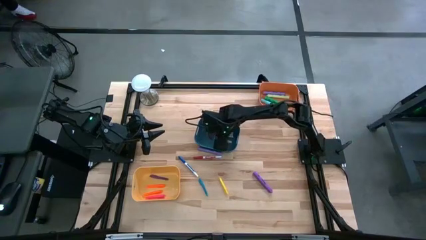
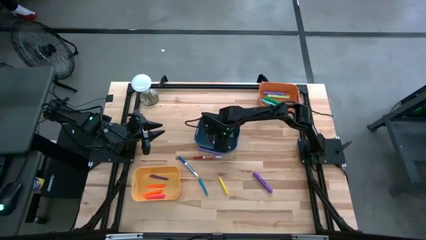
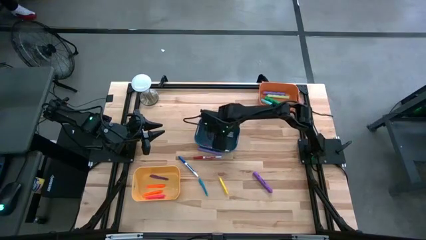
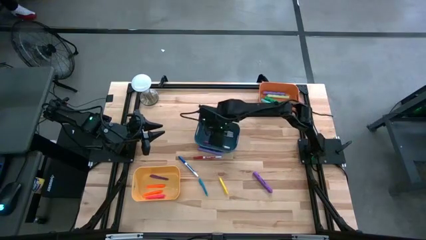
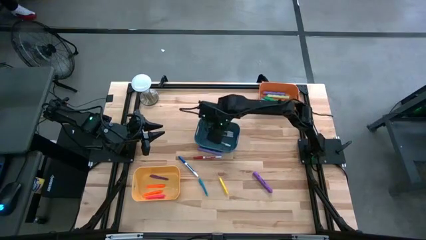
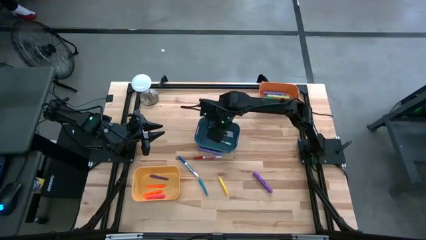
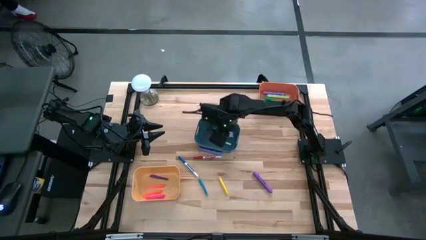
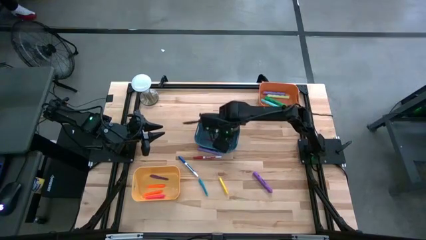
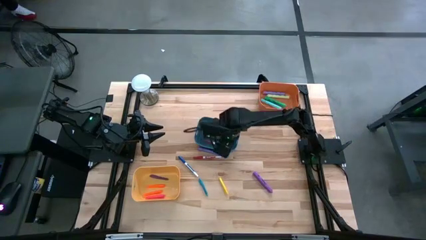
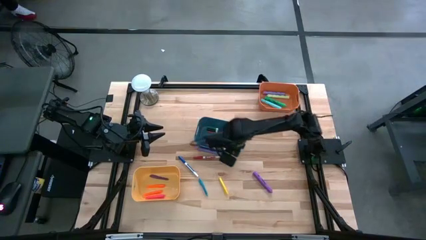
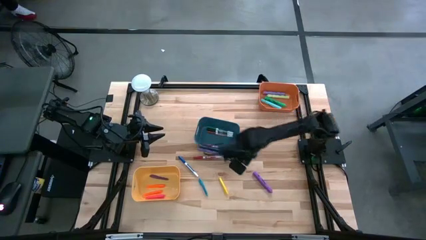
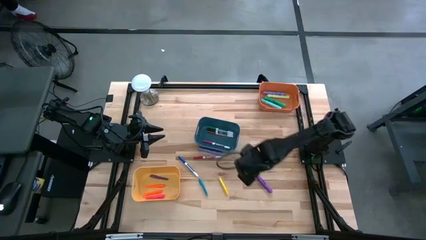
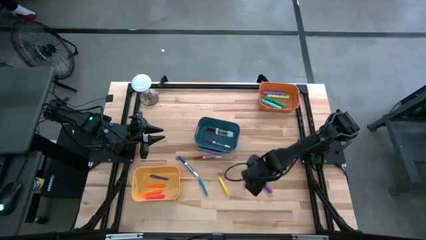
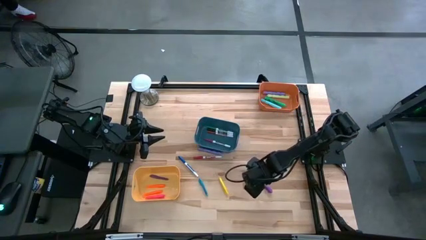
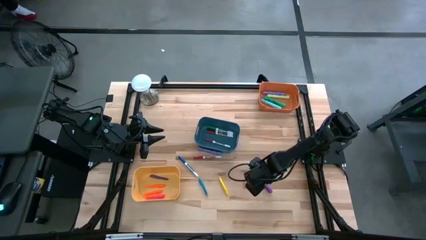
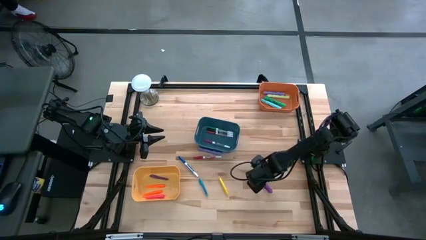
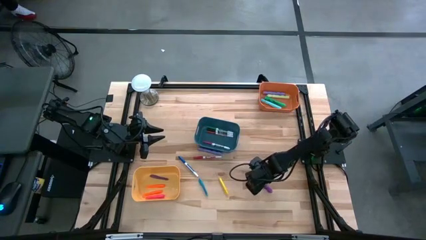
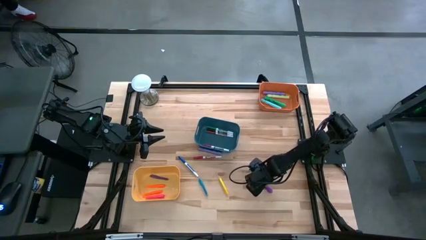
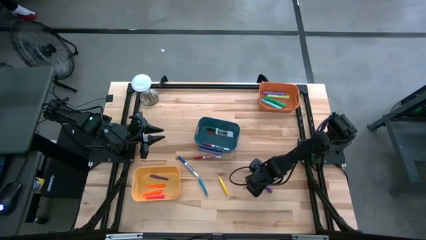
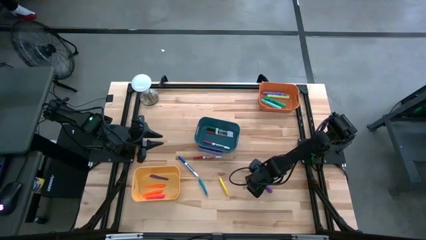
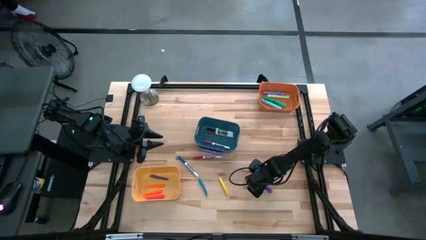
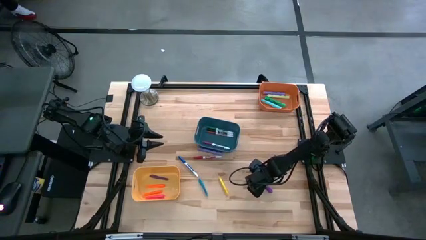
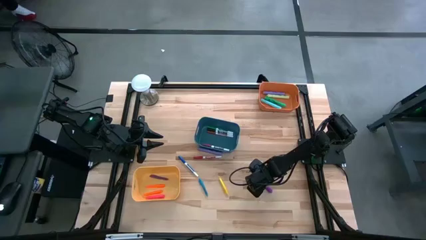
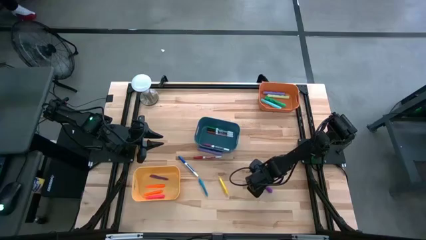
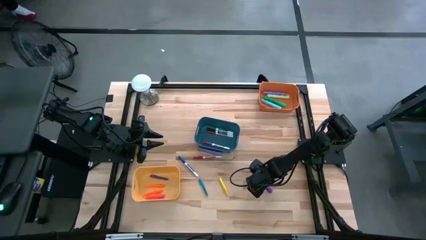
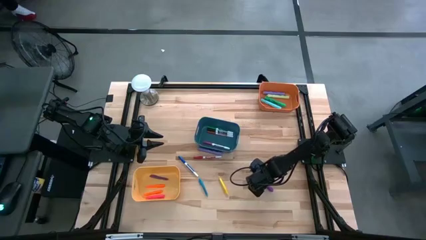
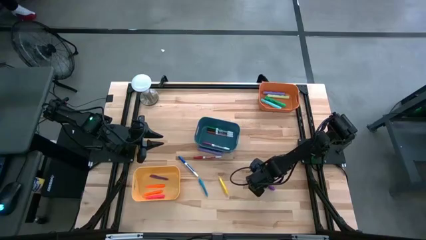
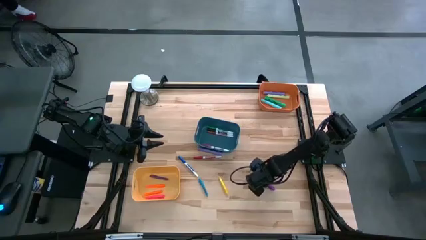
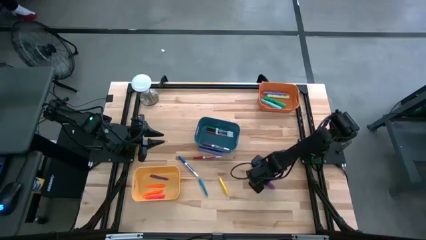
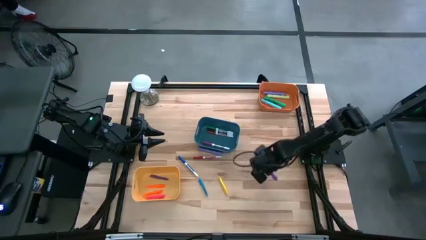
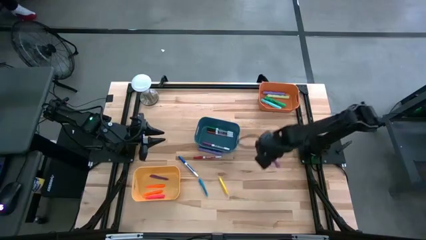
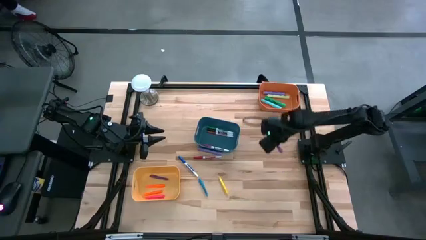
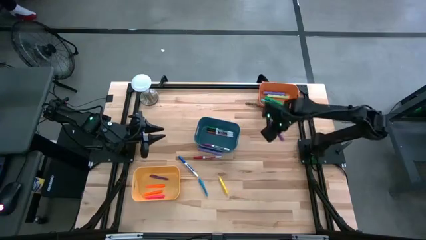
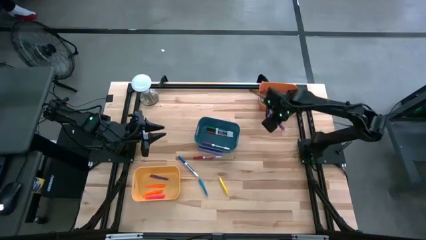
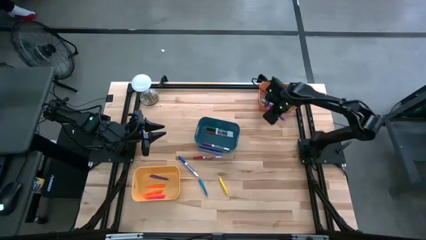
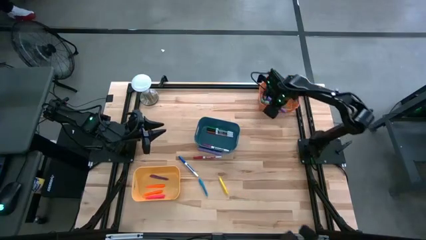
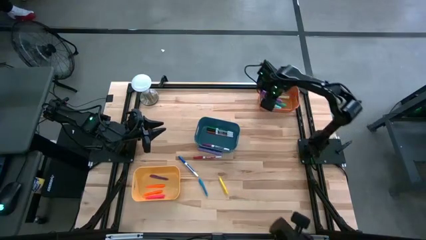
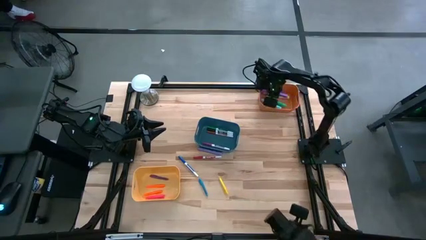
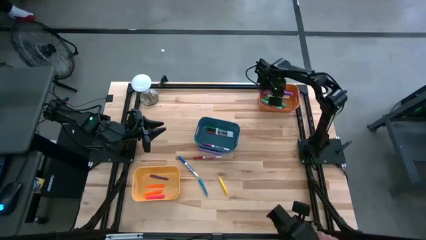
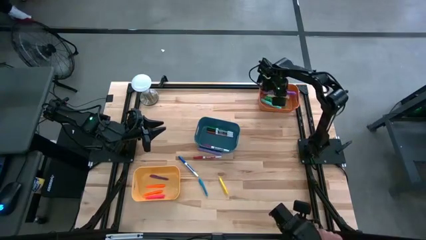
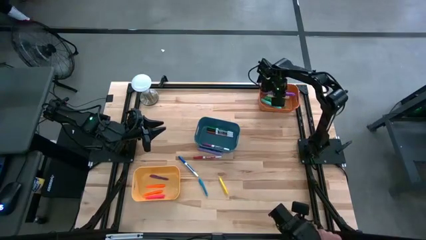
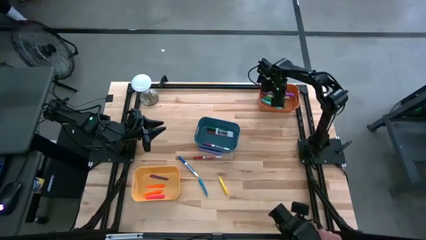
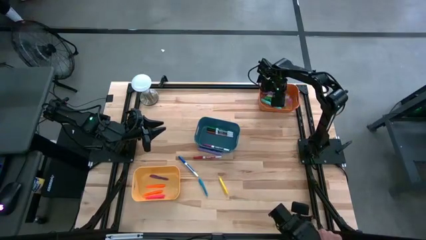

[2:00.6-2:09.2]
Task: Pick & Place Markers
Put the dark violet highlighter pen into the orange bin

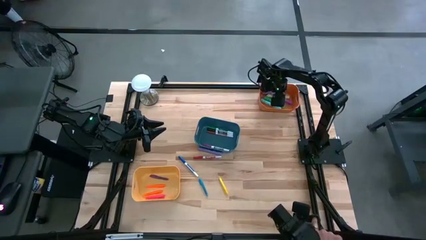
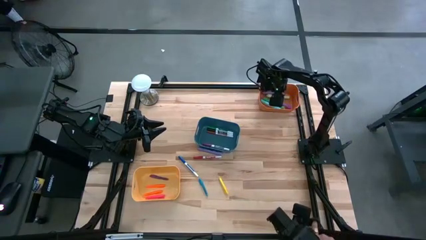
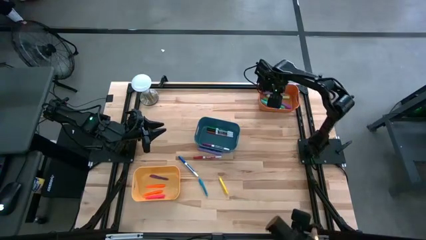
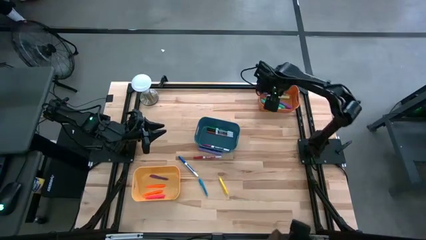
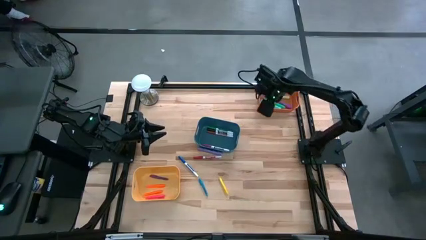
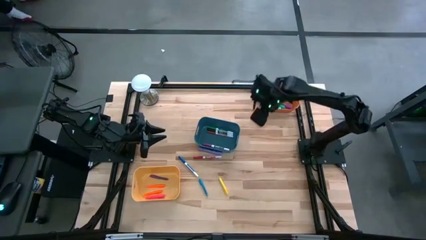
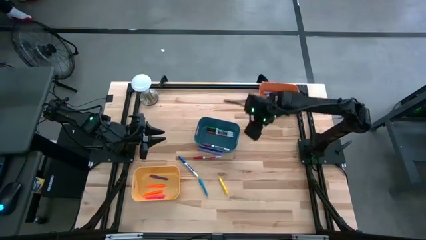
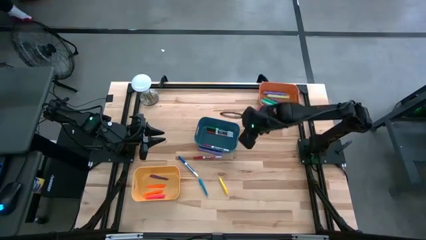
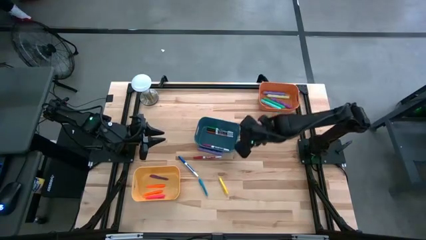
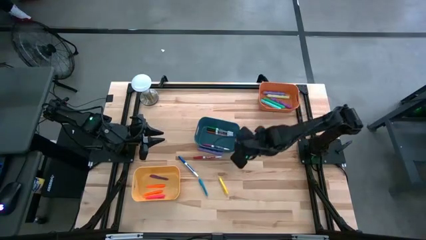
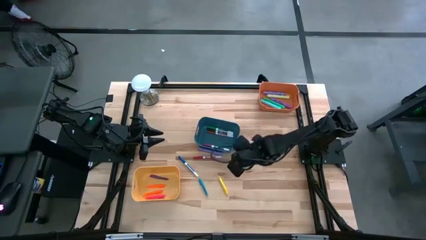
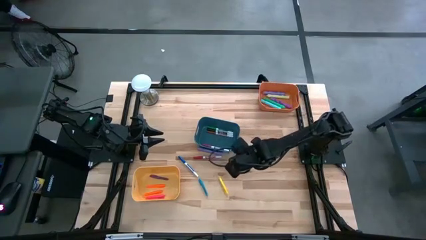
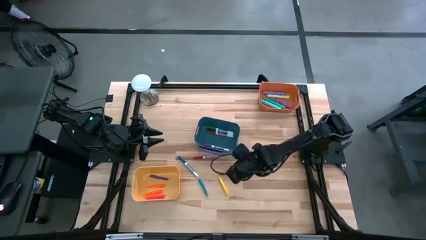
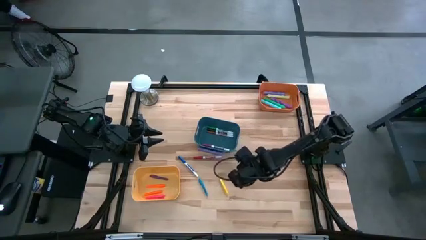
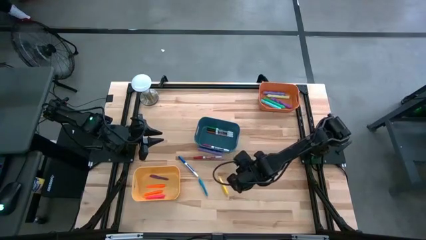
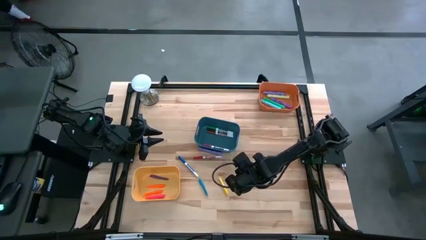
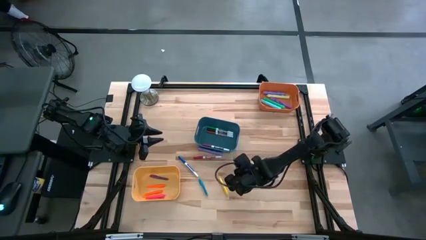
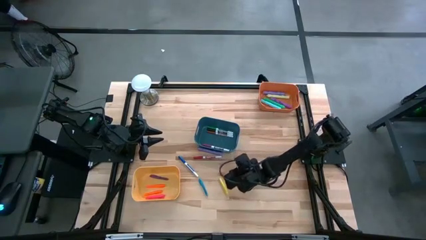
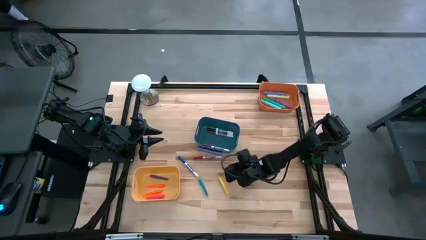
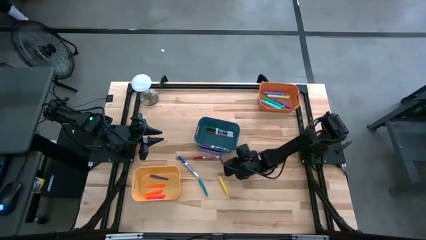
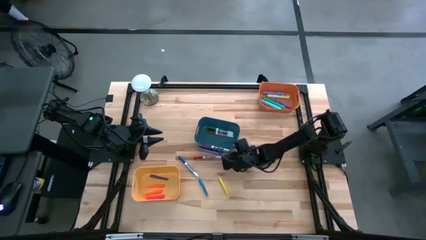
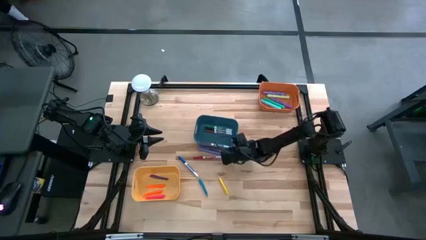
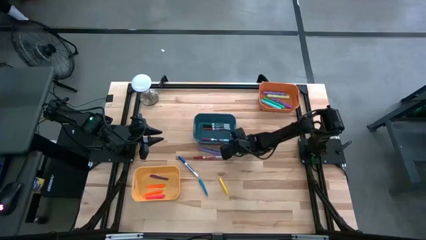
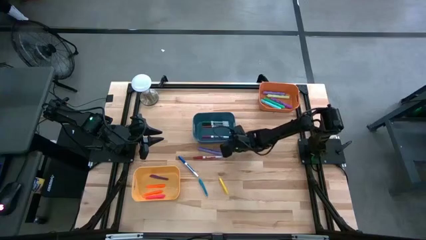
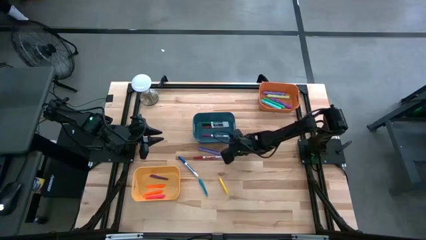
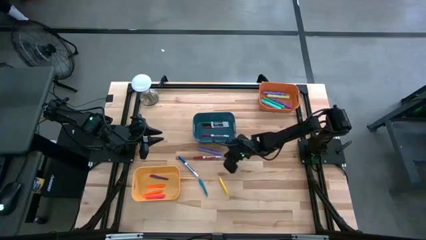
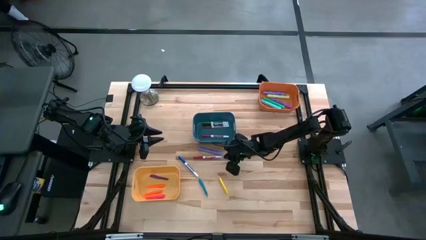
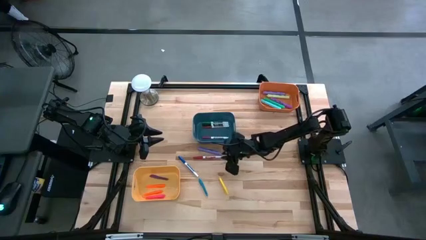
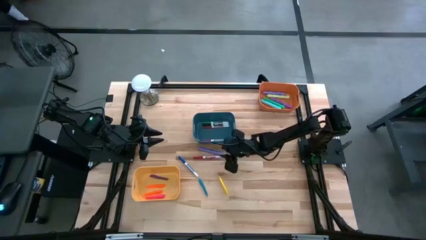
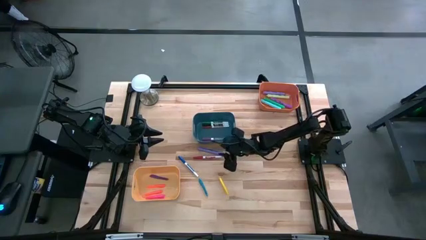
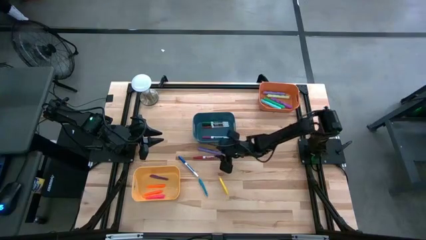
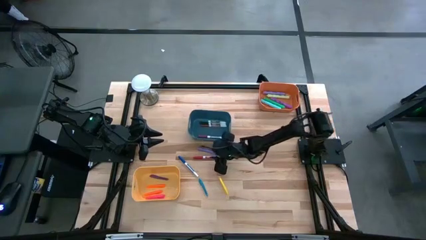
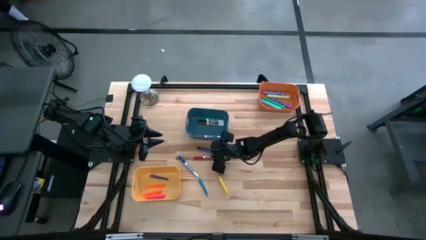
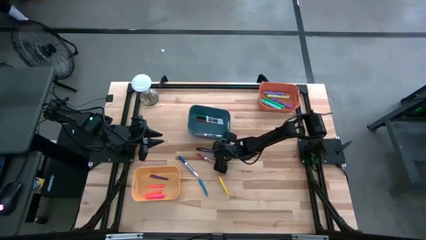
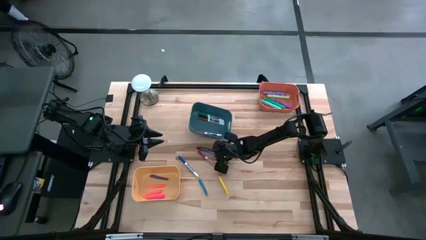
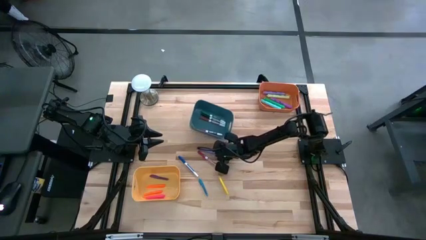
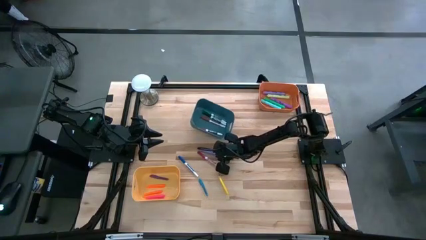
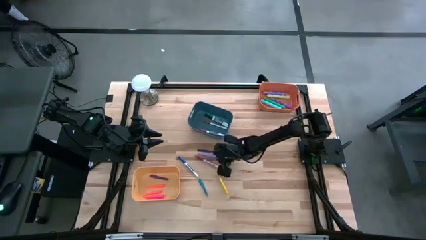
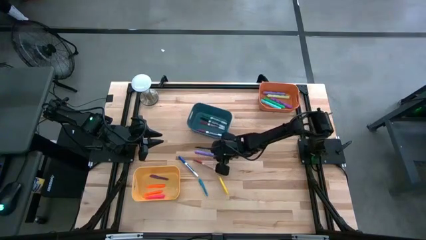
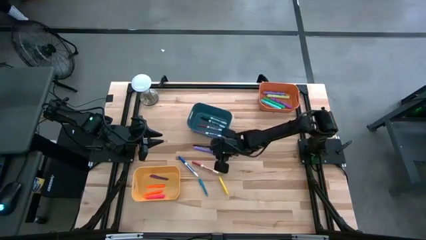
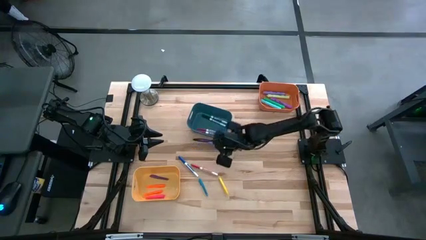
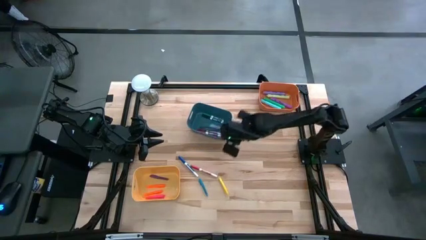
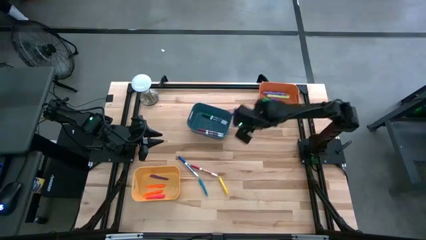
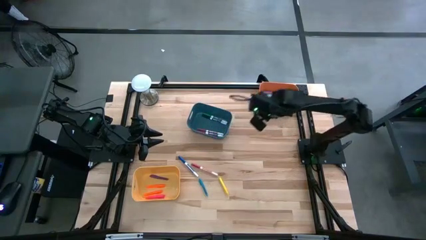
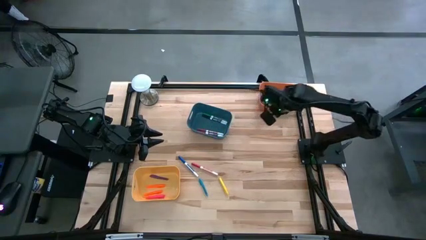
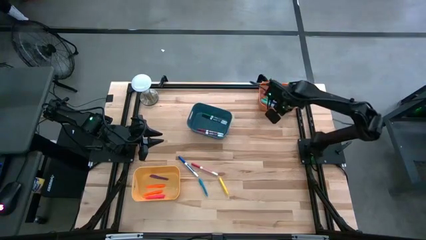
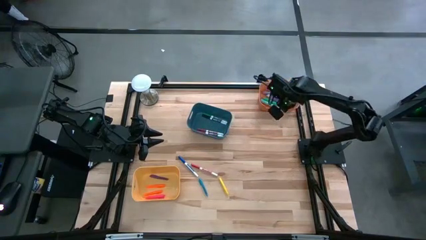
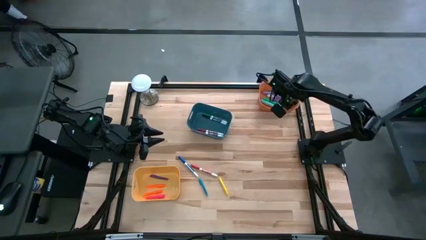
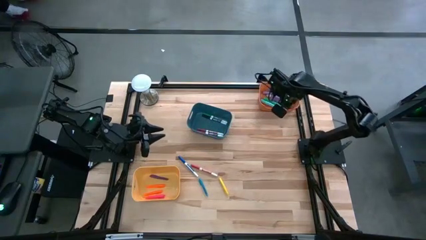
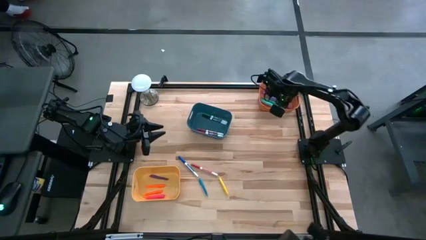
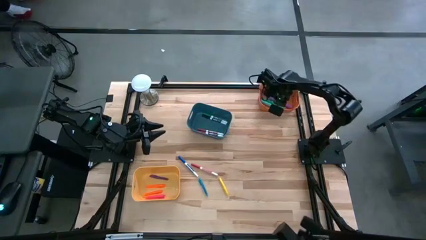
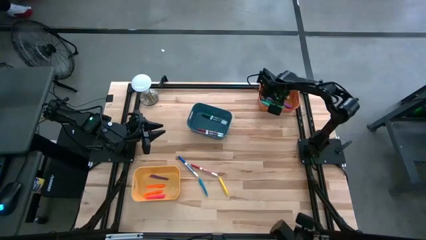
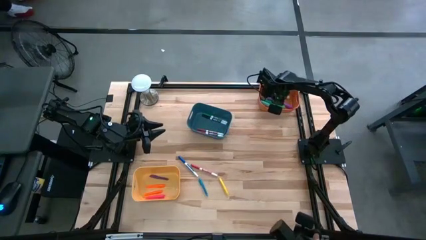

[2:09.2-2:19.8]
Put the light violet highlighter pen into the orange bin
